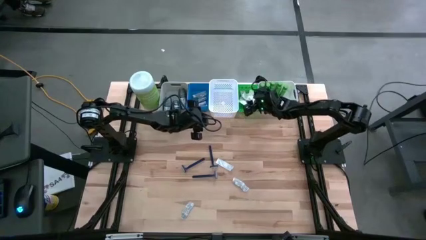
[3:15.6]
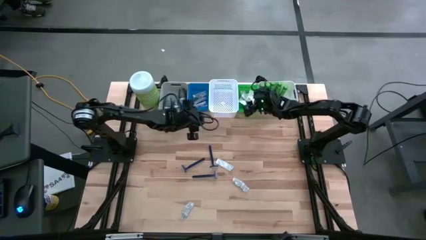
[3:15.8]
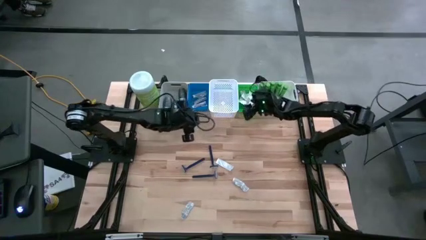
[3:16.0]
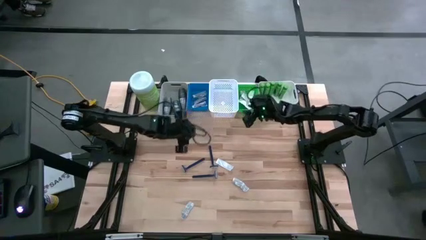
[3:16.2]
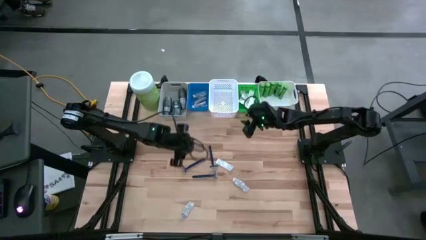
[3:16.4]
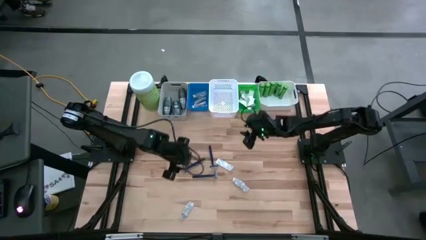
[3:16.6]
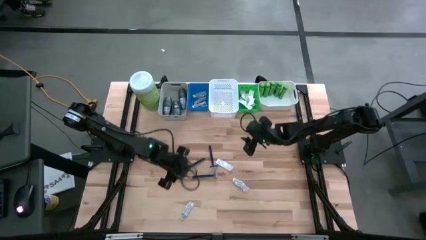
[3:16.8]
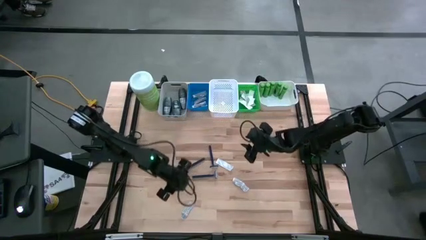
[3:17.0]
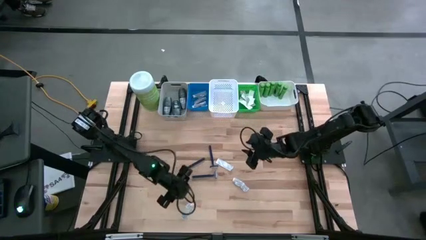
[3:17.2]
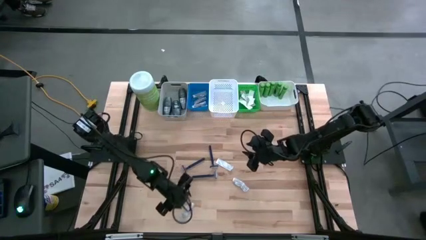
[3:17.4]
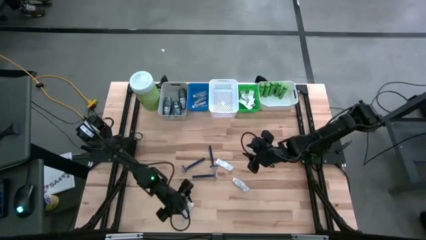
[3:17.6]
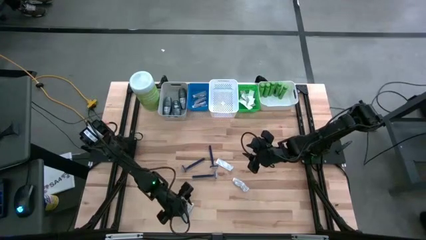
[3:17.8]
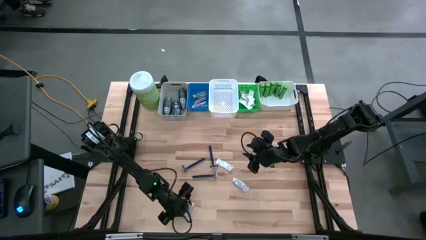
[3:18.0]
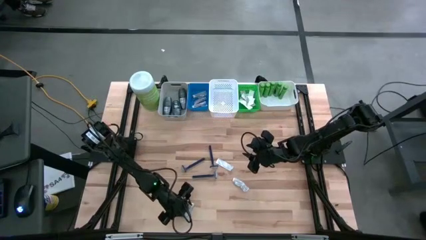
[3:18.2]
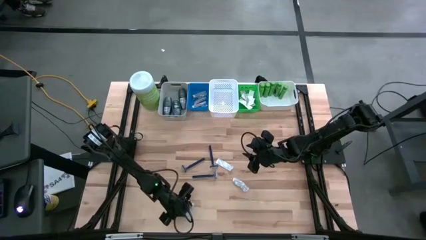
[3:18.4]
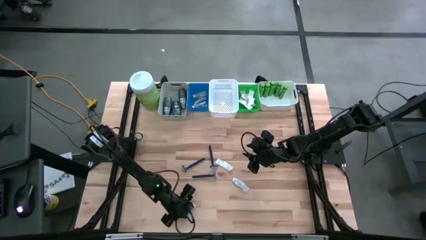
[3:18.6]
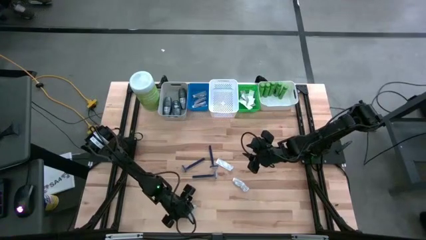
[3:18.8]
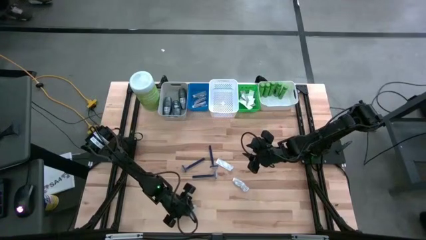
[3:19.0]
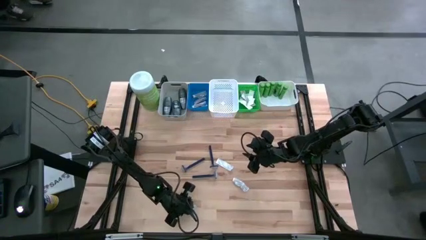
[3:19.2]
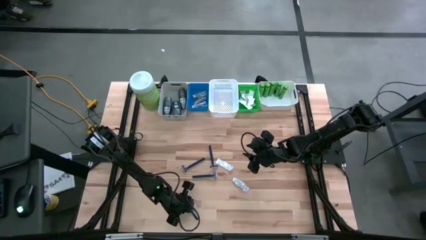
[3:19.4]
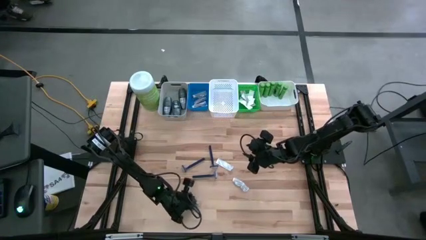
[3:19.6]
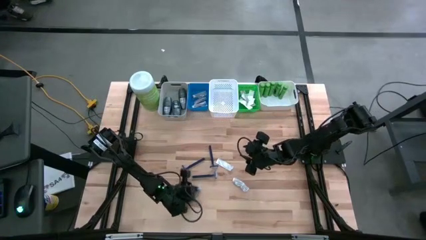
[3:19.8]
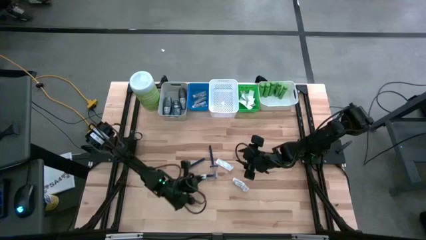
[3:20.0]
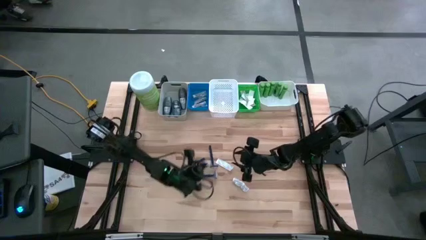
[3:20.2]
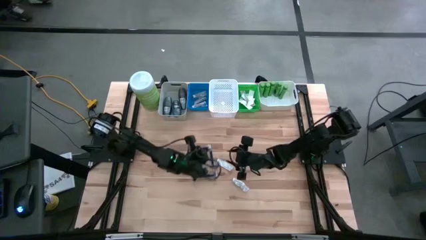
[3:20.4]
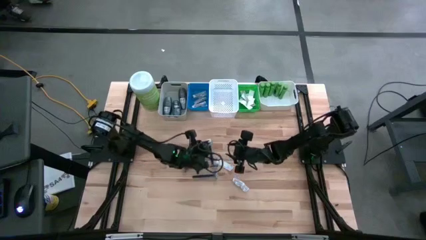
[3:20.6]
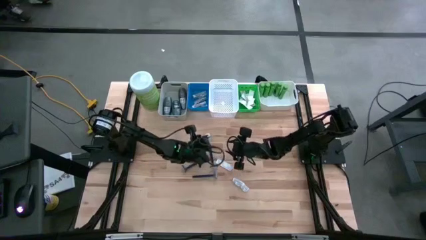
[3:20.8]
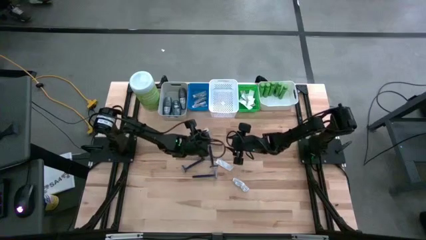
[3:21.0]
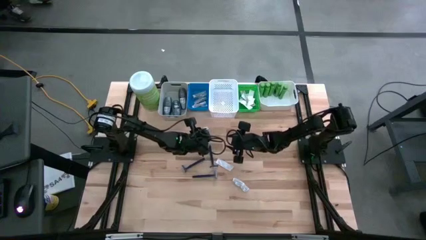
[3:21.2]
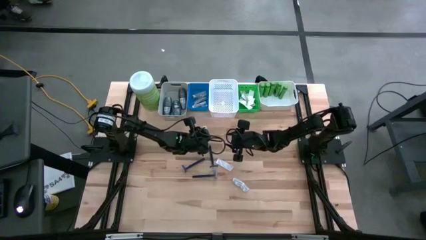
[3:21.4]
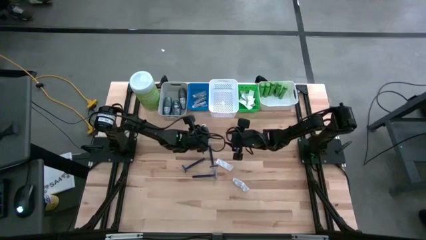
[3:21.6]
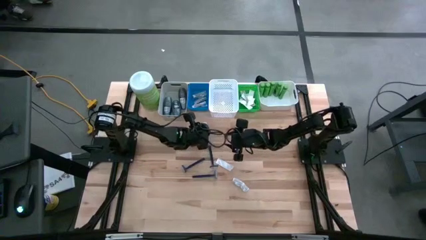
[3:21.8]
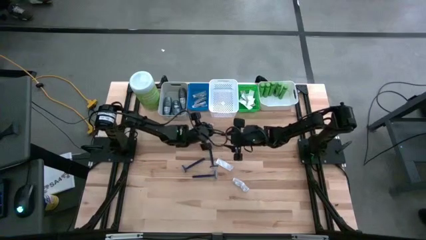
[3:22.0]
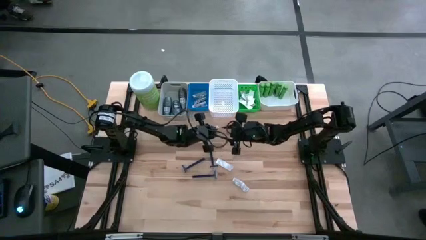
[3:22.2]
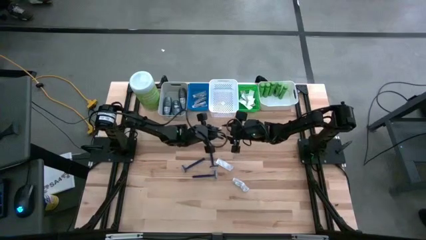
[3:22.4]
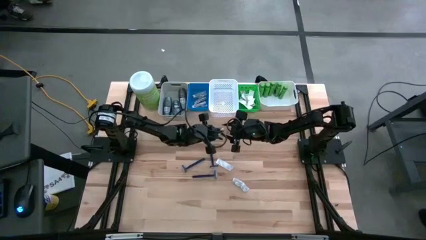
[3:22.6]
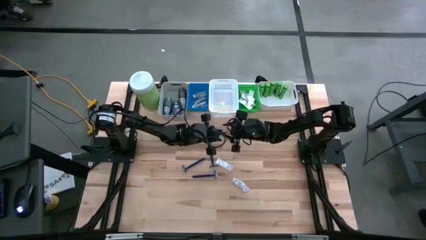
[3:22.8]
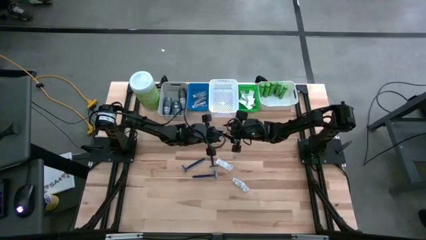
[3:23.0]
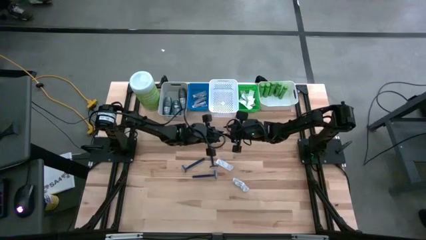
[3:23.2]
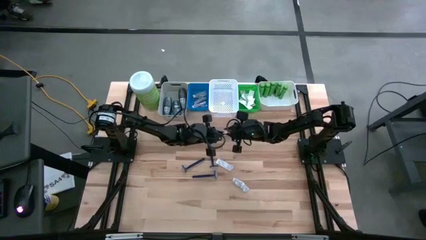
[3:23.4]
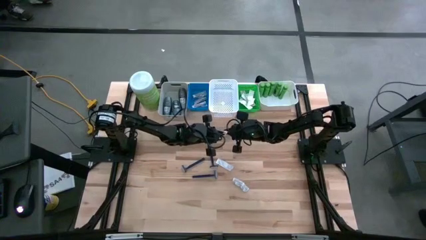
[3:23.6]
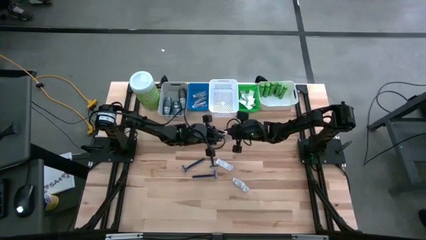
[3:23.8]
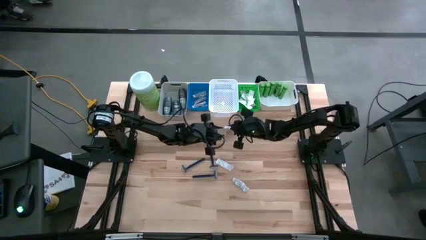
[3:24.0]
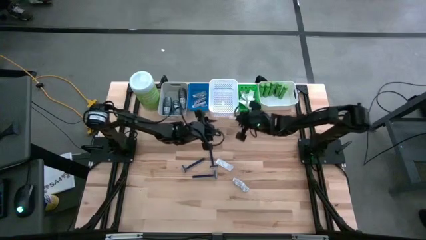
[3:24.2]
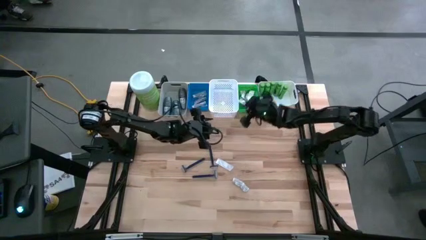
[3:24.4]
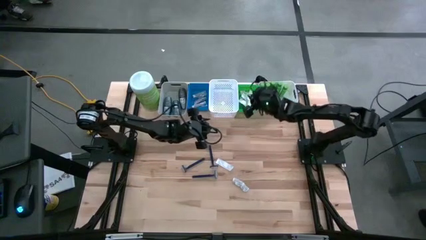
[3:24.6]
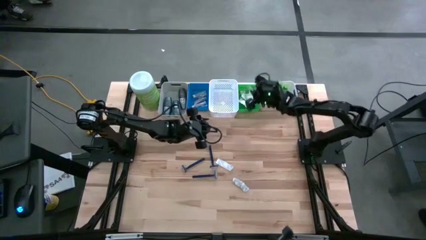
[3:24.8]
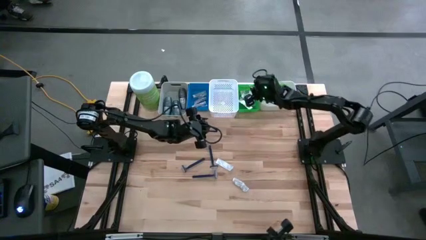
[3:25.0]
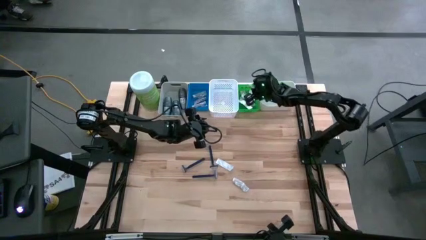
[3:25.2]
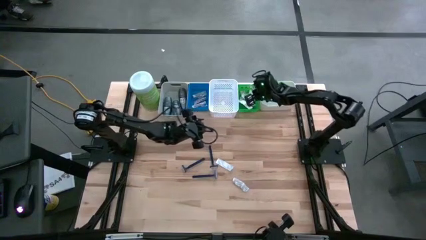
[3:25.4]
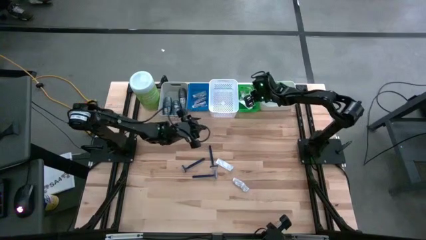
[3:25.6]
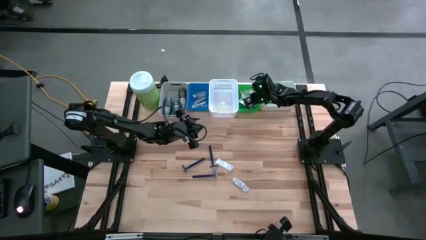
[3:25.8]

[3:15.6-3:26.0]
Task: Pick & Place Travel size toiletries
Put the bottom white bandage pack into the green bin

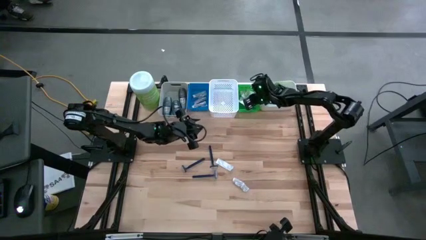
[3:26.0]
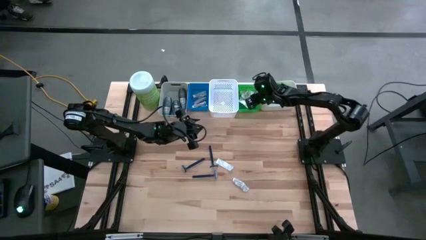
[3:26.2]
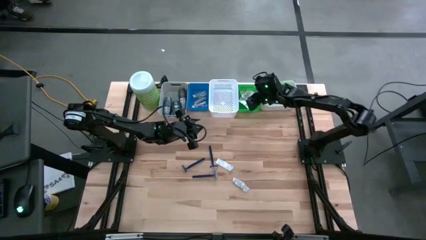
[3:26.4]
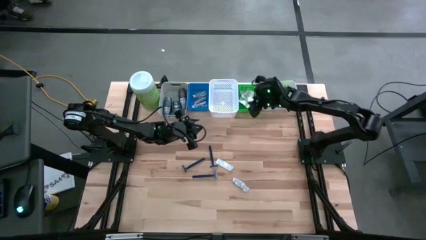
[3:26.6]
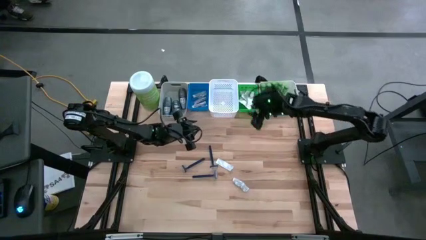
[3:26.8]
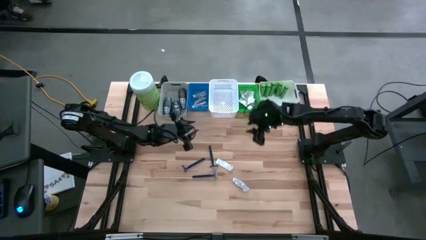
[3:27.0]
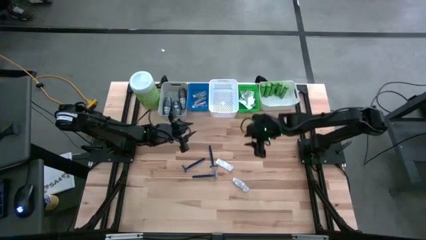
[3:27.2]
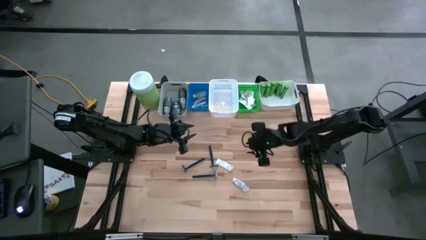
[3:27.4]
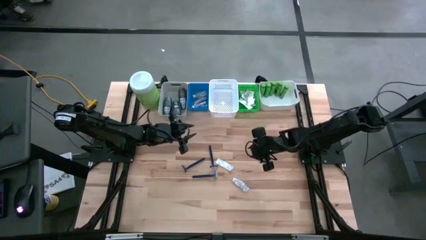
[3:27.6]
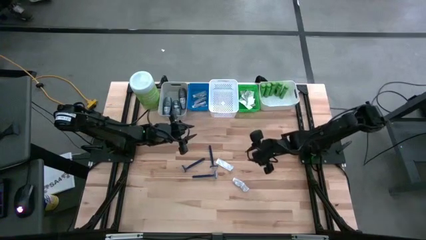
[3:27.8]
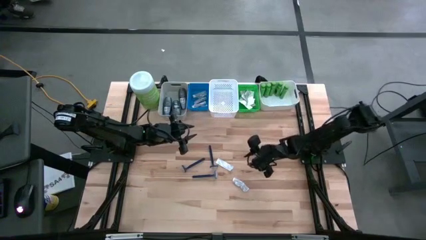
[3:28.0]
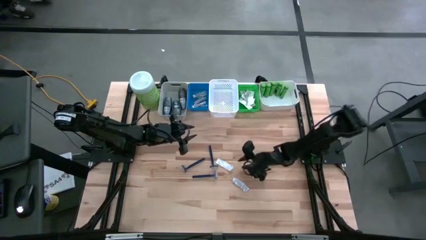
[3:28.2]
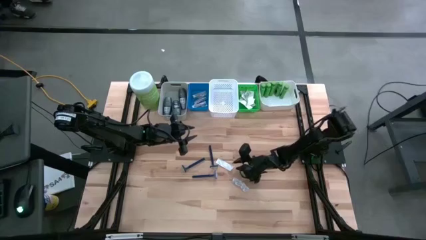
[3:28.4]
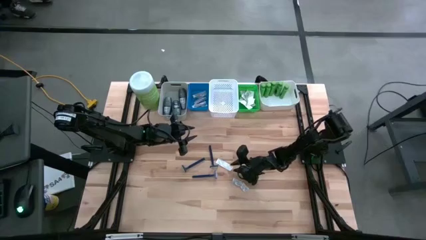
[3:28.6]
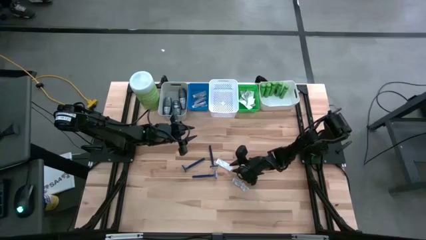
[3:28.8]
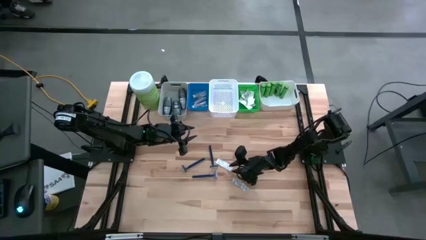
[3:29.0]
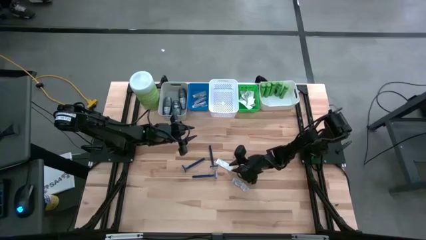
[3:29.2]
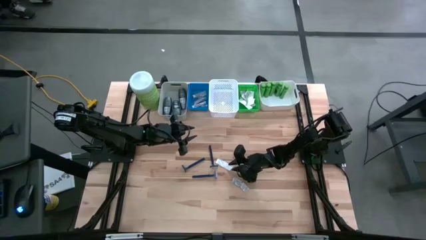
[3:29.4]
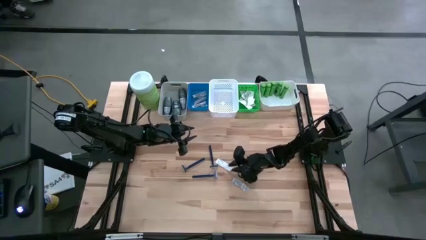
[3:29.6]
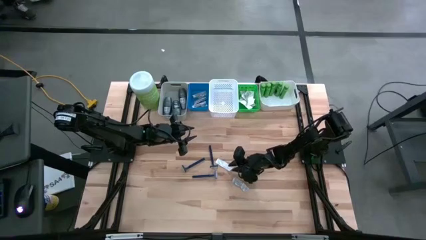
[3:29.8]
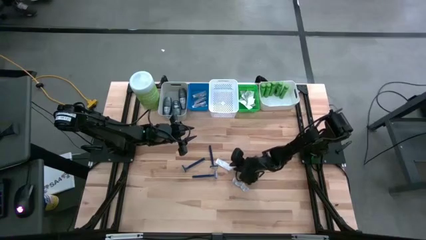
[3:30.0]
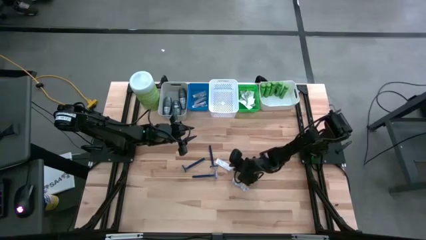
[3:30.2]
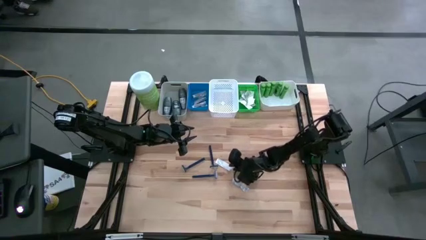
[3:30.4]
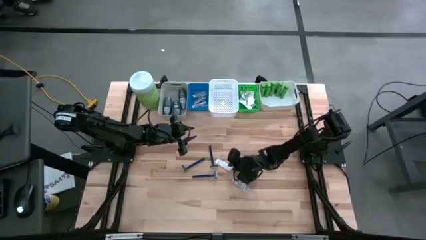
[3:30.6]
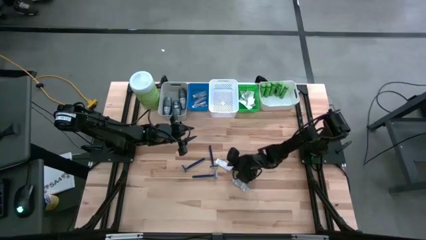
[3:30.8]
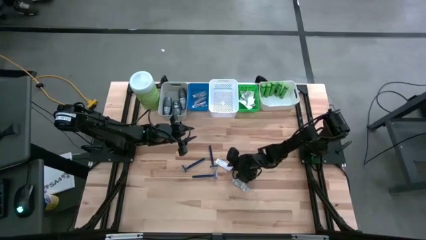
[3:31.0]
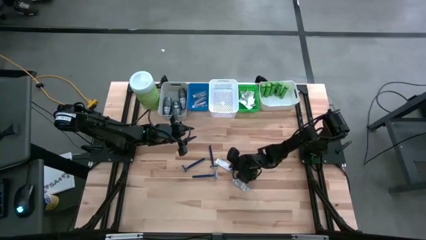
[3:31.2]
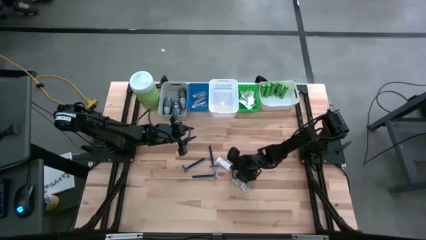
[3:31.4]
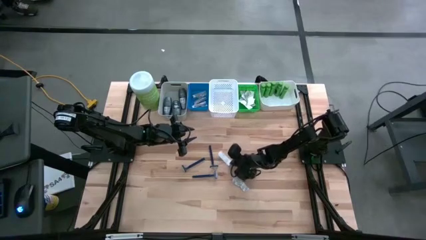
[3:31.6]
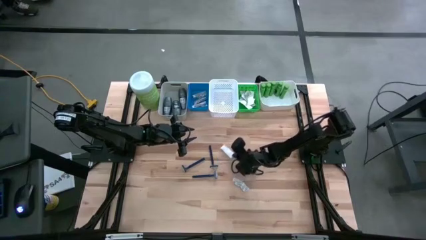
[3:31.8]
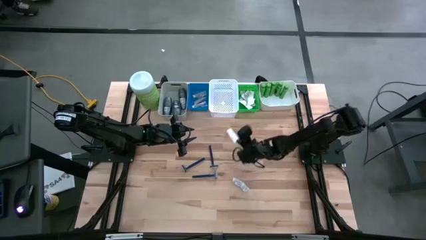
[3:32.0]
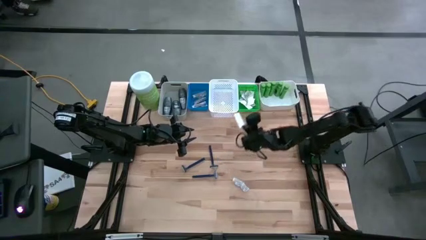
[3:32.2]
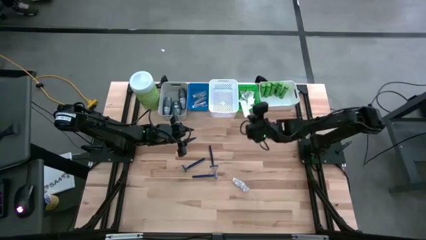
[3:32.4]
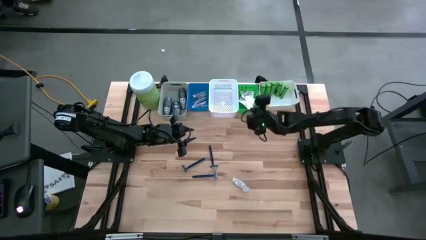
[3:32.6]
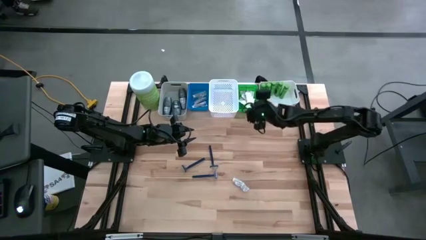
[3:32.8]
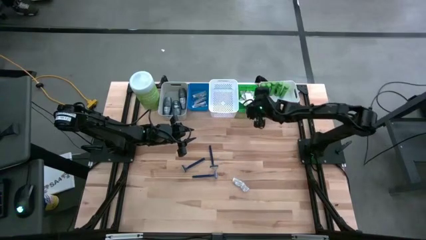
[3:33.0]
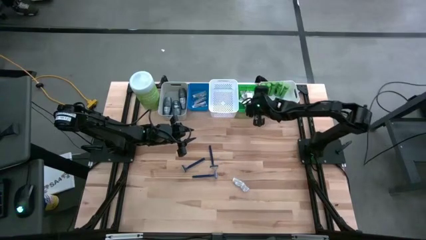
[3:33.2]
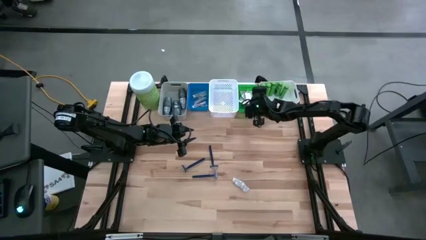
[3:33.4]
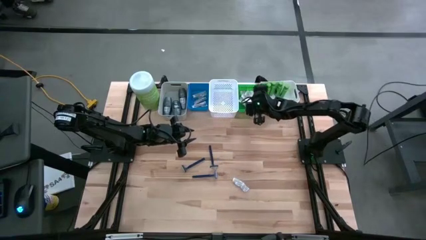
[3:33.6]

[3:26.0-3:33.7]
Put the top white bandage pack into the green bin
